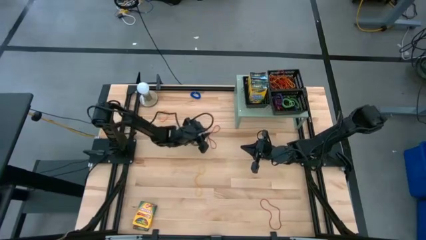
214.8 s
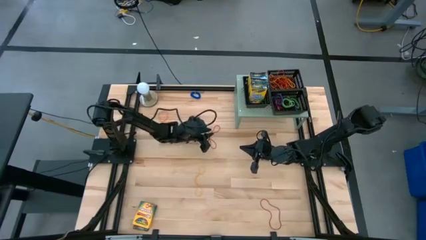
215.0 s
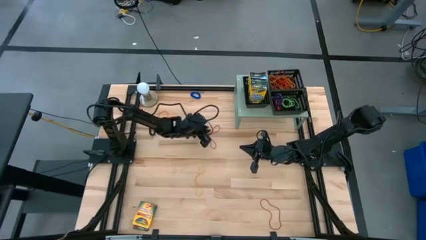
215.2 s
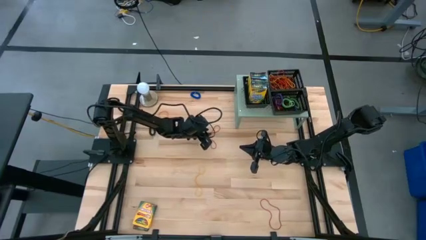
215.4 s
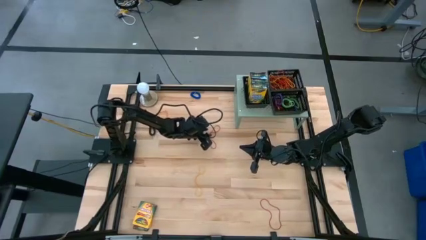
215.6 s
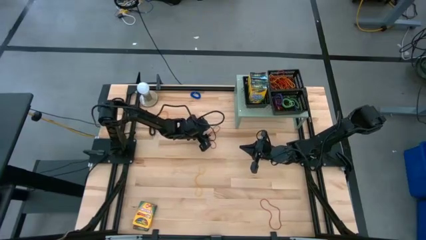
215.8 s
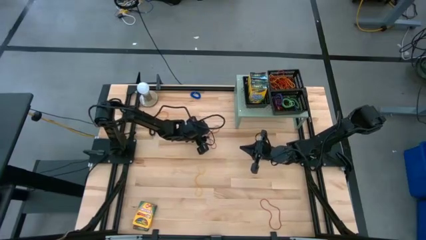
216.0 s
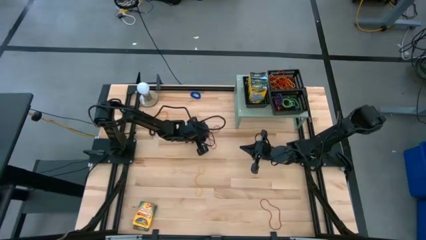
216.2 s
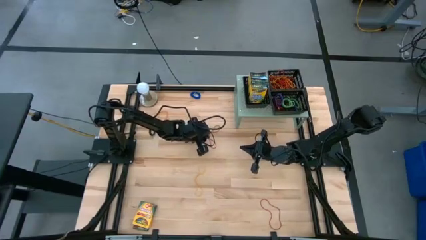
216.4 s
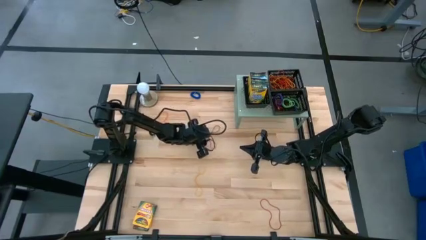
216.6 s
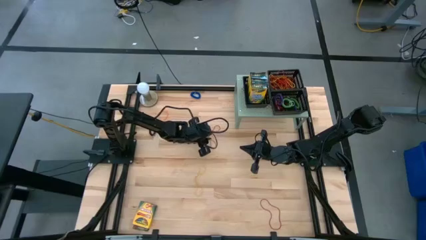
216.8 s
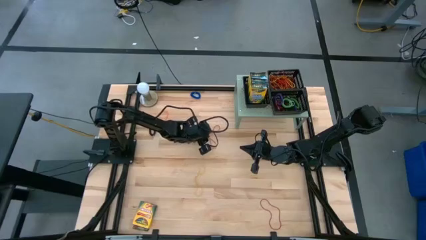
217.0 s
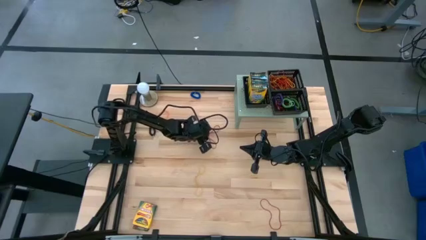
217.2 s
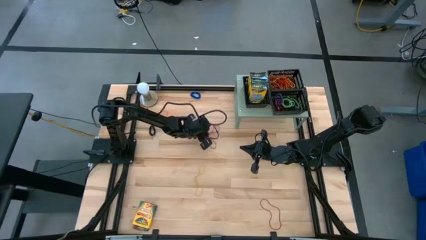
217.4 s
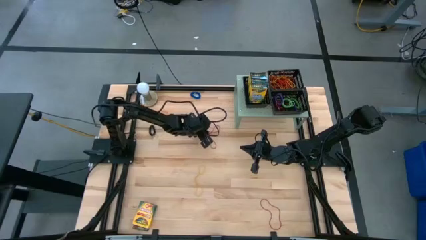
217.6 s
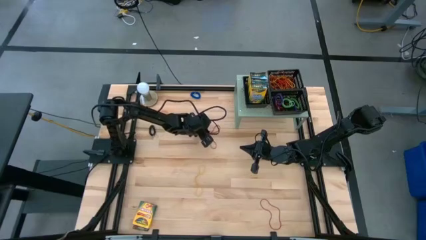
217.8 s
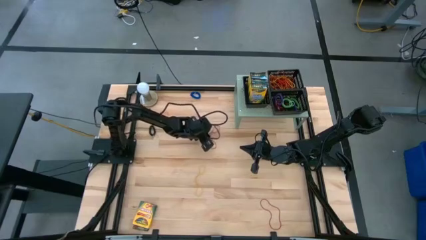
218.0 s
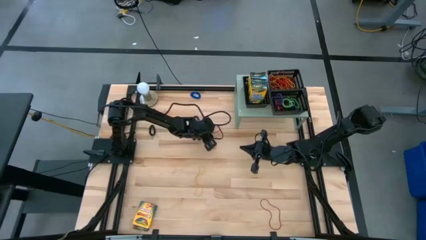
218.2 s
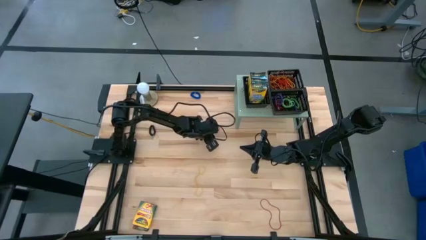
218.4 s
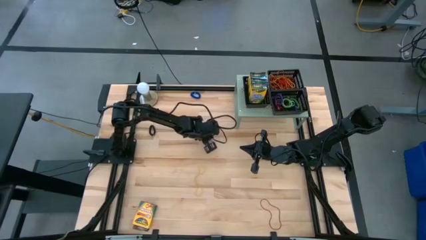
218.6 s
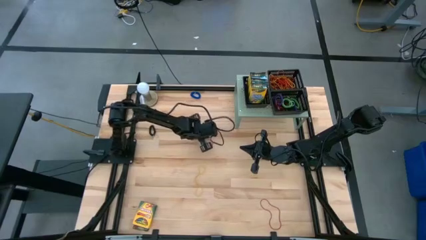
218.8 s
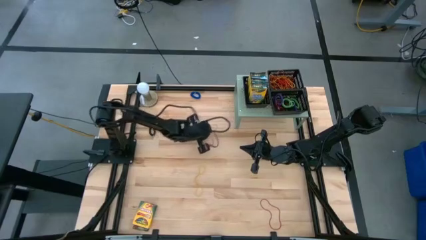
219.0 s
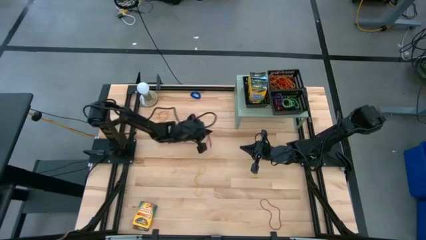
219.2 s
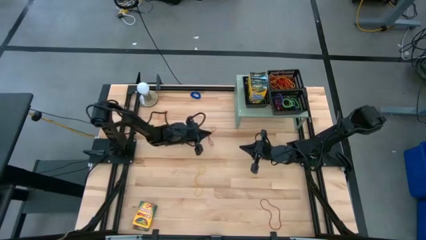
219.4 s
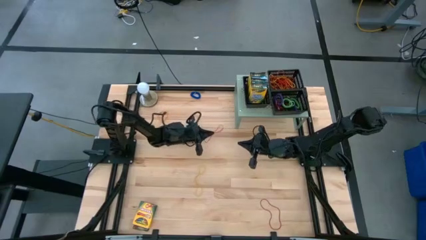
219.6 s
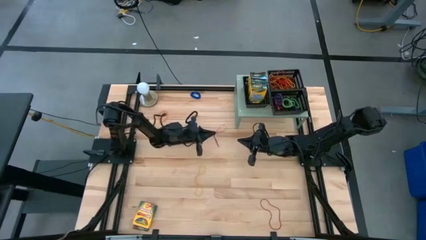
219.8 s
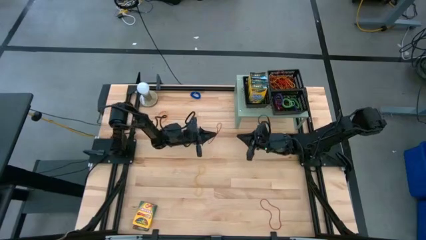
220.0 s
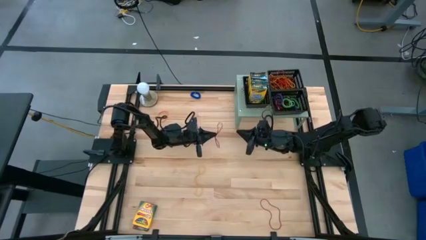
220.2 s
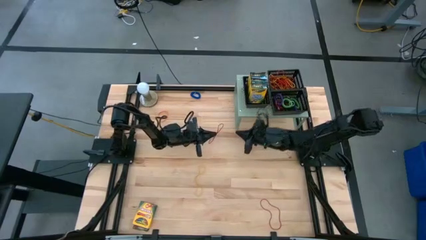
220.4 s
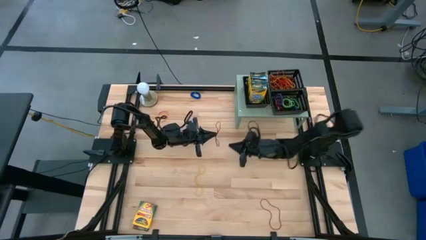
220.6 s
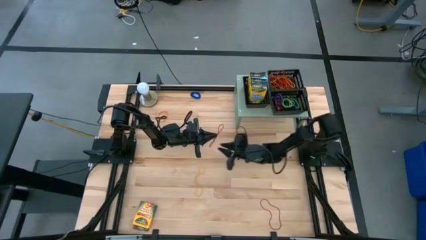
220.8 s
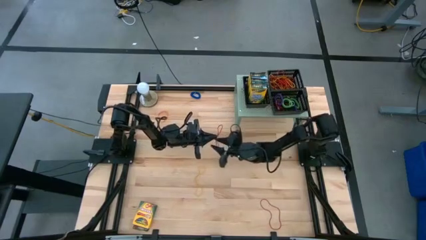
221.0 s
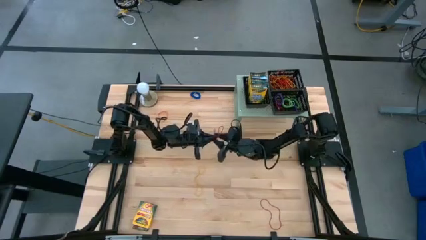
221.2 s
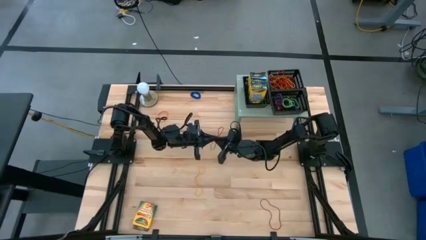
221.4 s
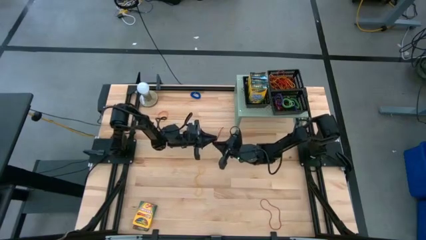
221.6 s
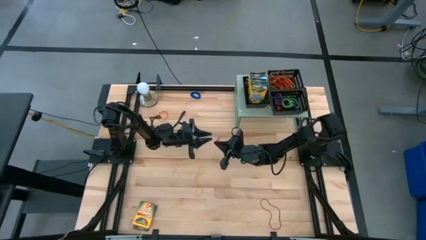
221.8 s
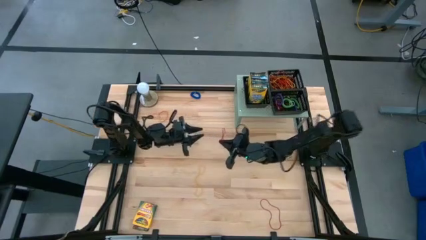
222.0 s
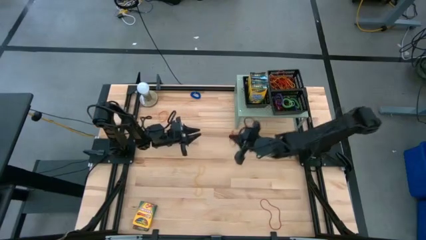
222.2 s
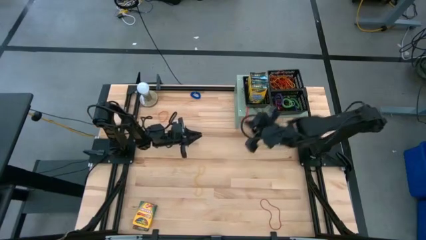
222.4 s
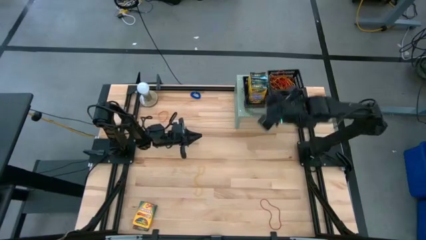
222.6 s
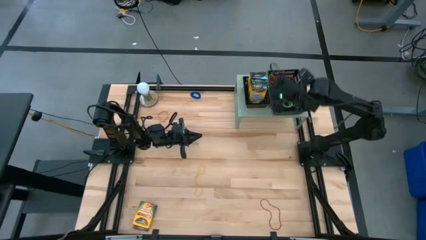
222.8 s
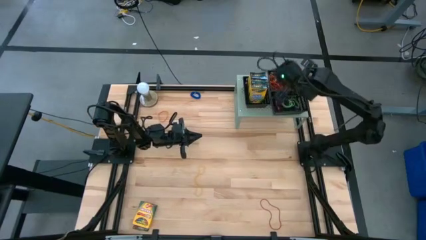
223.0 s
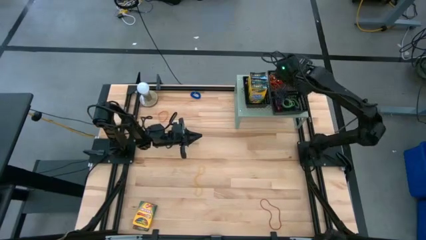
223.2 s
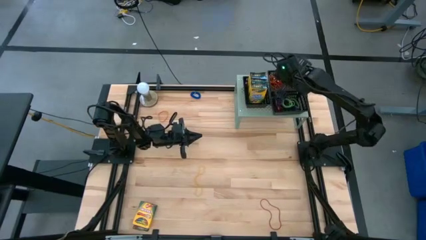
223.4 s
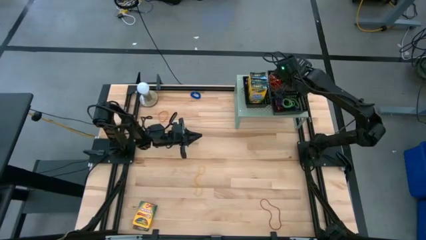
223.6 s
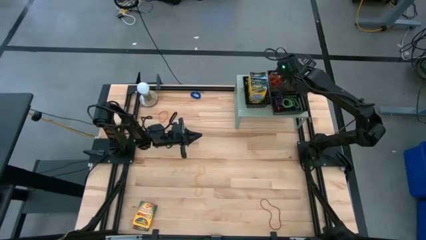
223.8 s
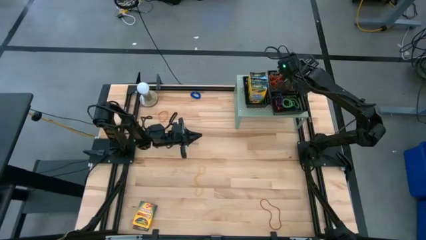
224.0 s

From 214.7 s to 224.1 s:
Task: Pick & Place Office Desk Supplies
Put the red rubber band into the top right black bin on the shelf

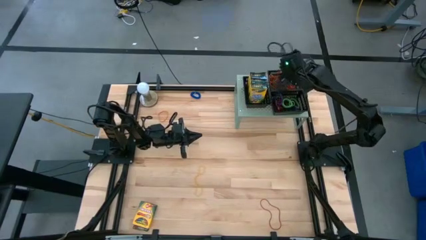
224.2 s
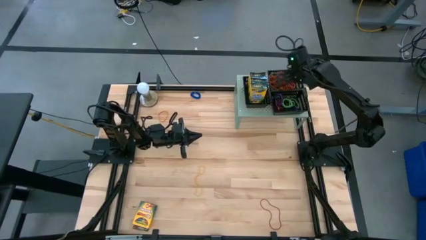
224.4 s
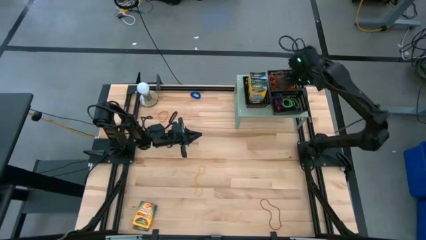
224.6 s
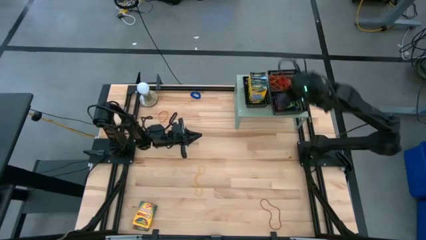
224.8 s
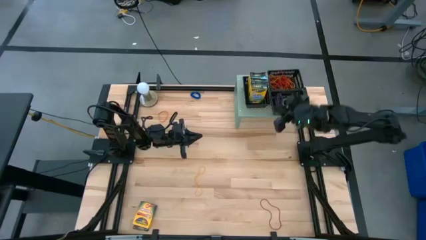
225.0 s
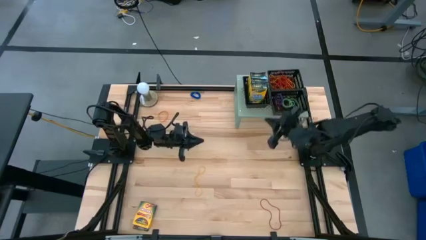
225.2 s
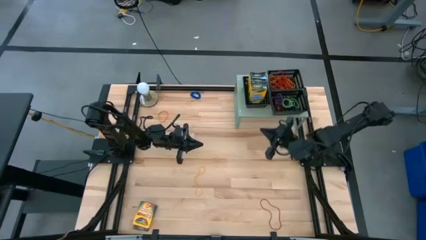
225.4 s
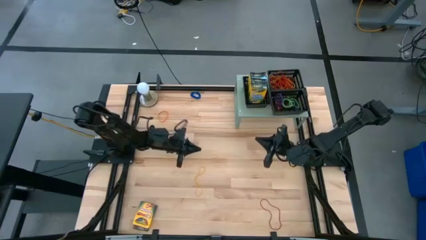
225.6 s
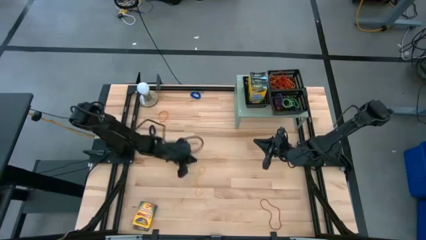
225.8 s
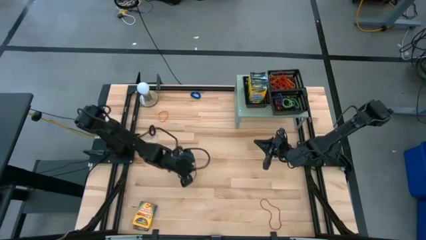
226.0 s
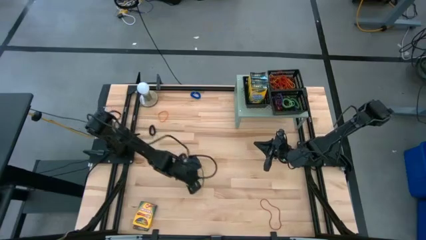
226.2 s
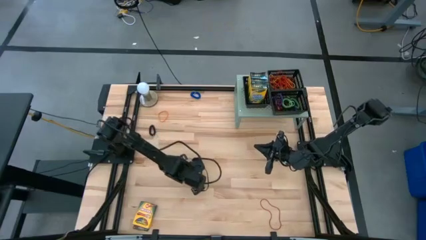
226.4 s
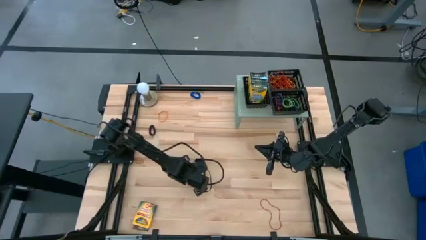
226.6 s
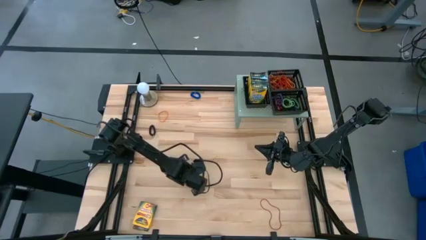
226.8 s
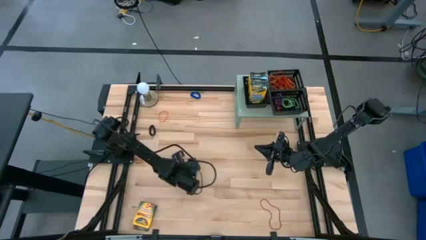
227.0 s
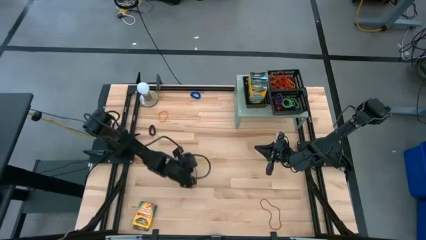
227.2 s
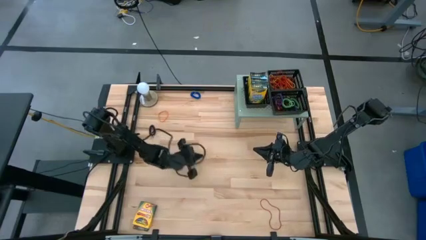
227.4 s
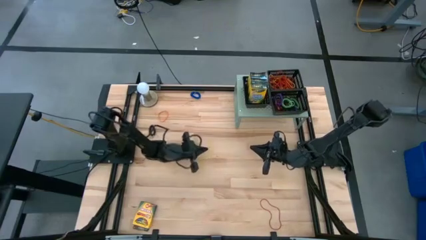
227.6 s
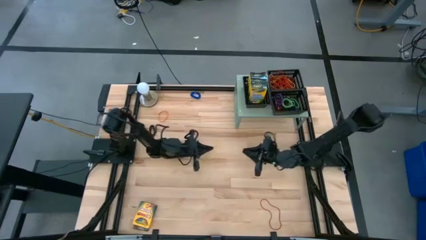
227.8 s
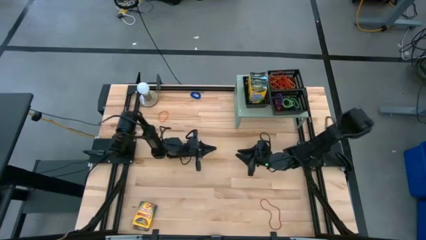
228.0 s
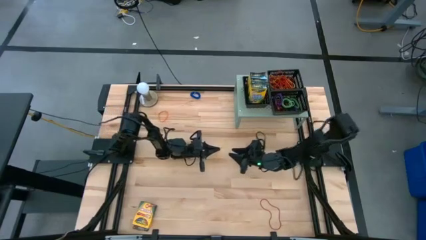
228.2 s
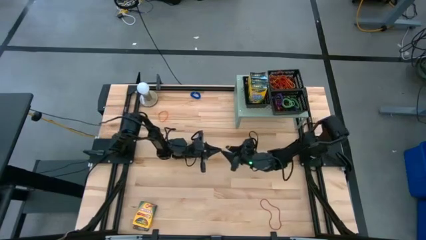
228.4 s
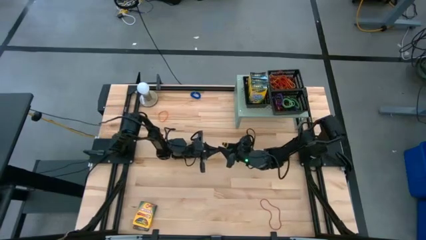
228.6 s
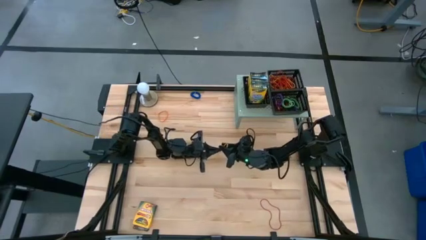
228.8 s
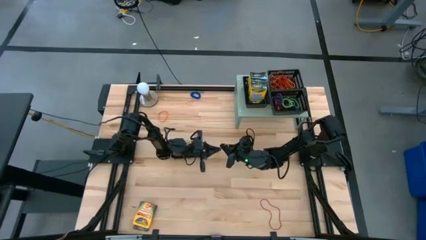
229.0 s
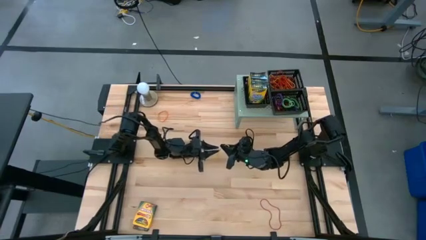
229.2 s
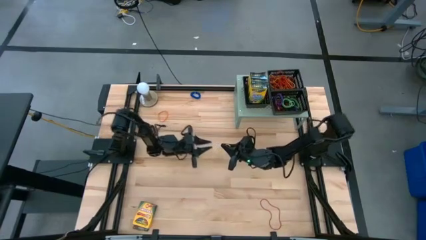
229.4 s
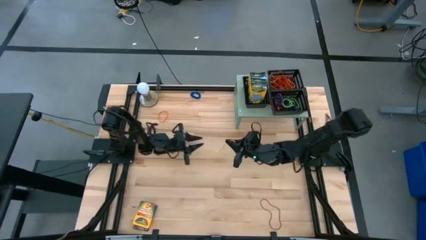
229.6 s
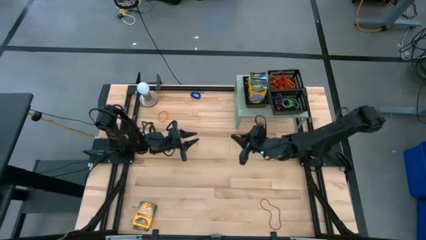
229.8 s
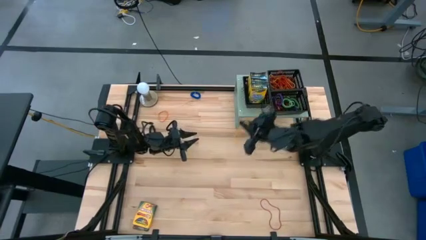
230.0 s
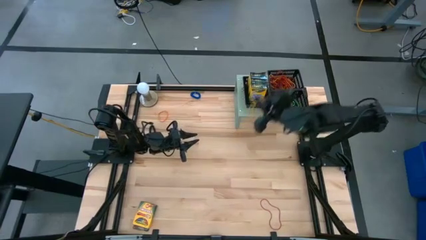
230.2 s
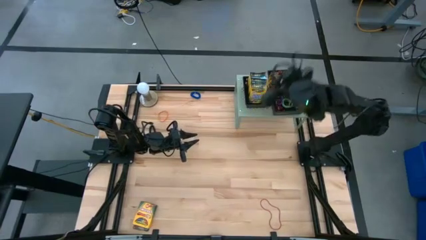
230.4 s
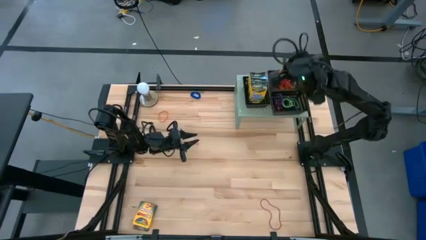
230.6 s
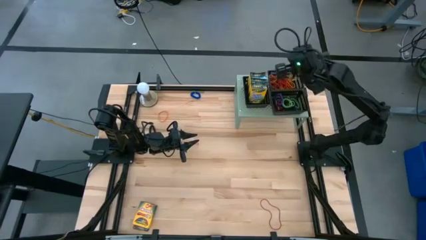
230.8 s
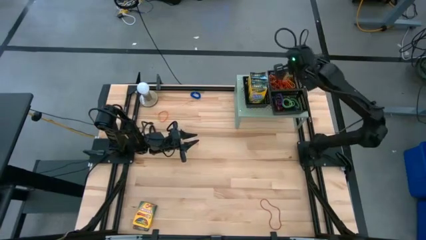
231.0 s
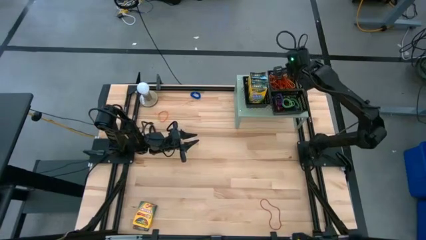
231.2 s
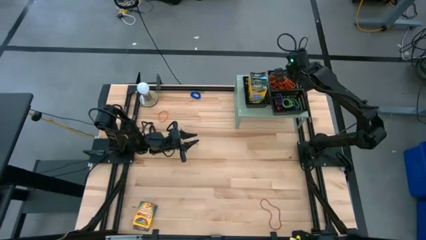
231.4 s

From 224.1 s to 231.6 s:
Put the yellow rubber band into the top right black bin on the shelf

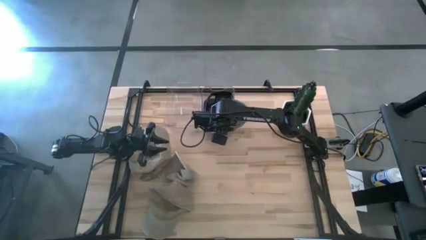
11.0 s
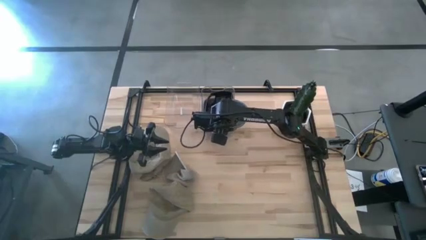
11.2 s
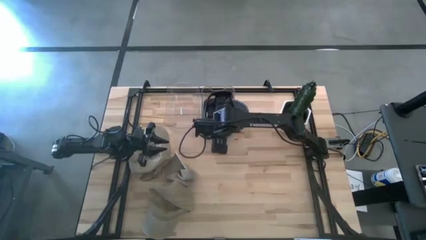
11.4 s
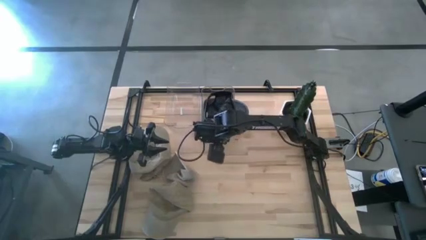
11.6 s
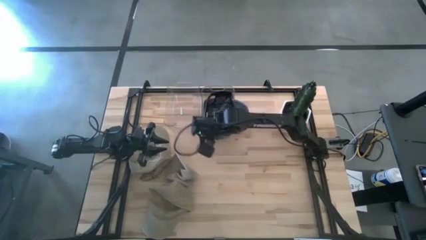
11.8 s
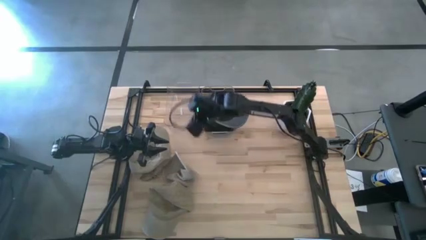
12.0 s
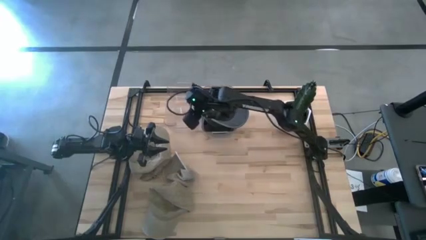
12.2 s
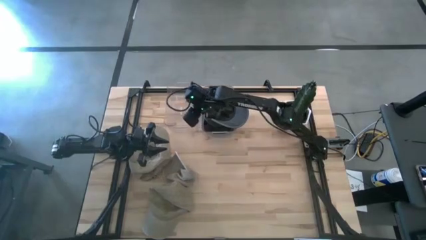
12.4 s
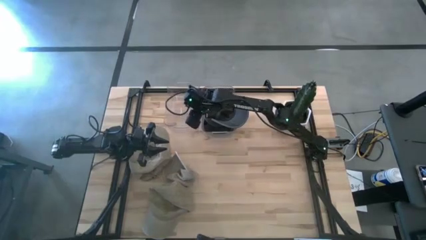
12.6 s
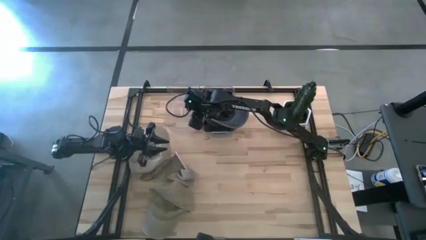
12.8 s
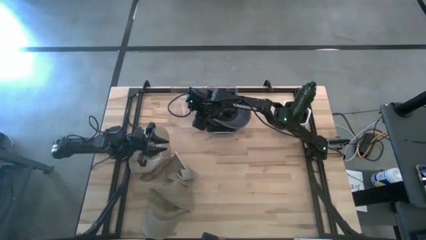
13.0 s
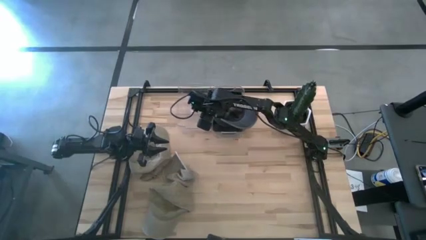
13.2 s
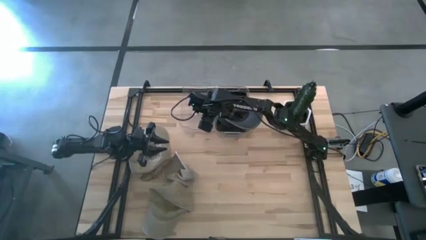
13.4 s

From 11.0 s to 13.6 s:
Task: Pick & Place hat
Adjust the transparent bins
